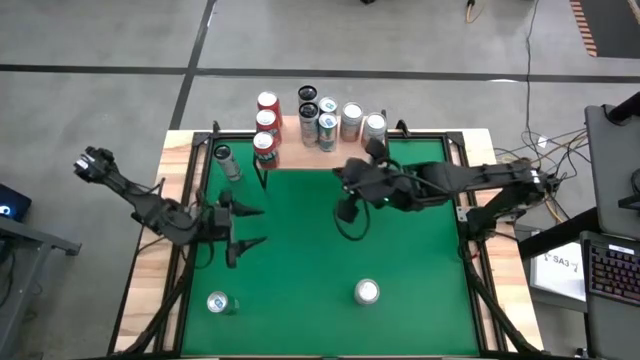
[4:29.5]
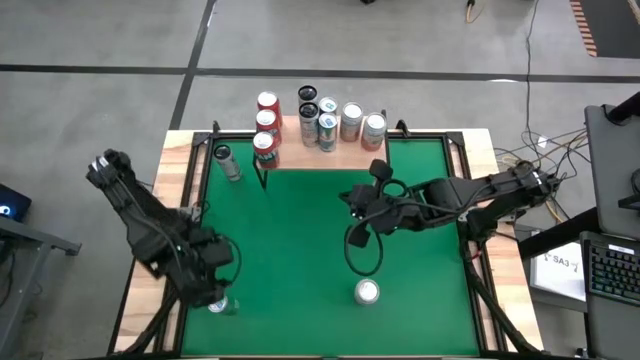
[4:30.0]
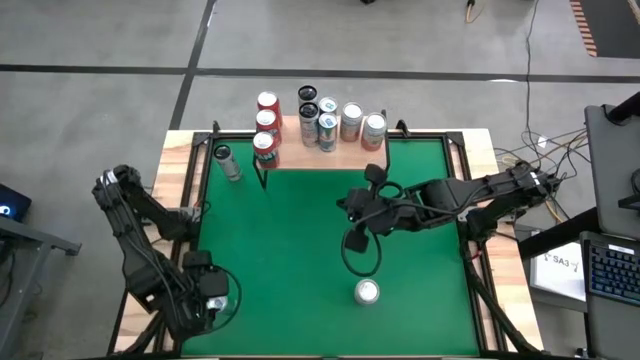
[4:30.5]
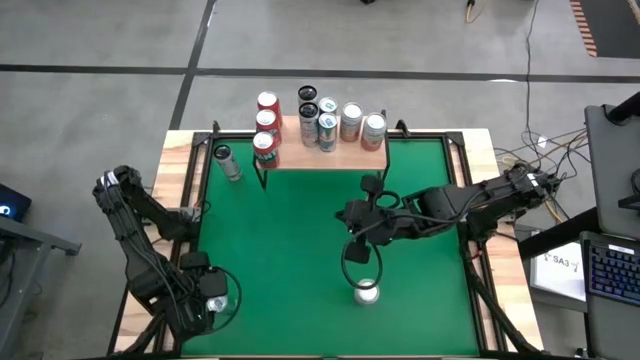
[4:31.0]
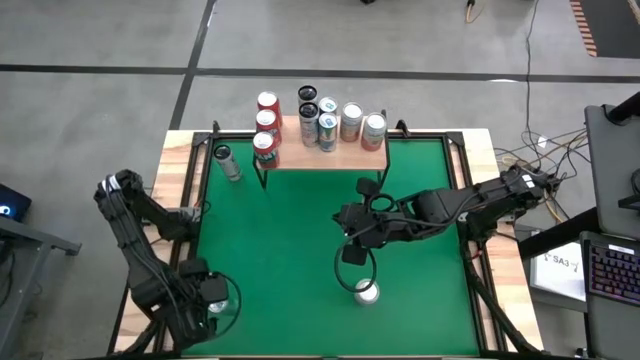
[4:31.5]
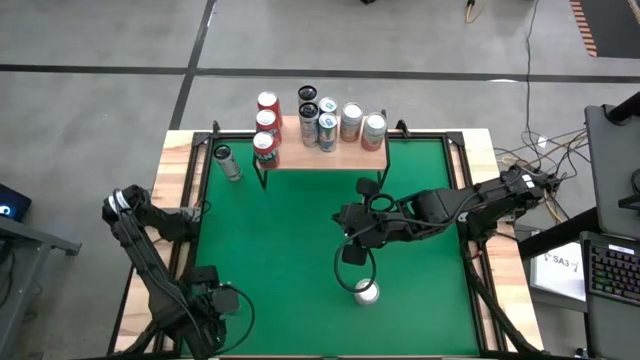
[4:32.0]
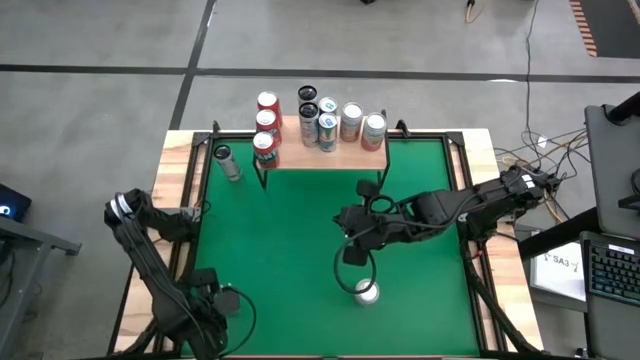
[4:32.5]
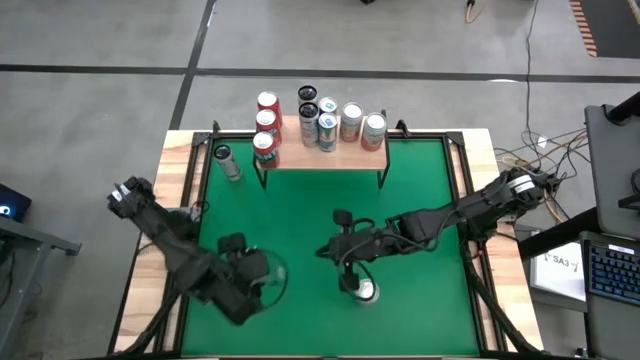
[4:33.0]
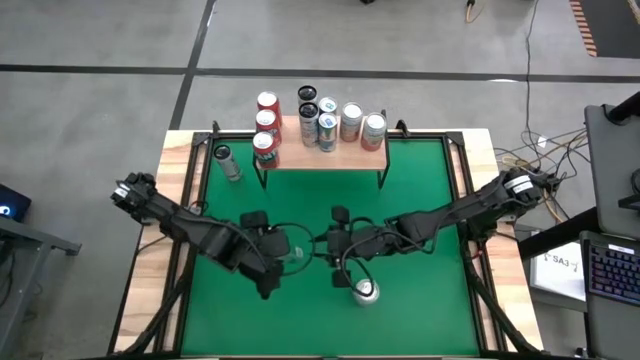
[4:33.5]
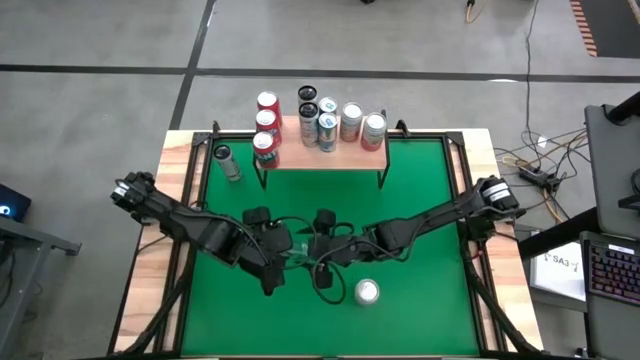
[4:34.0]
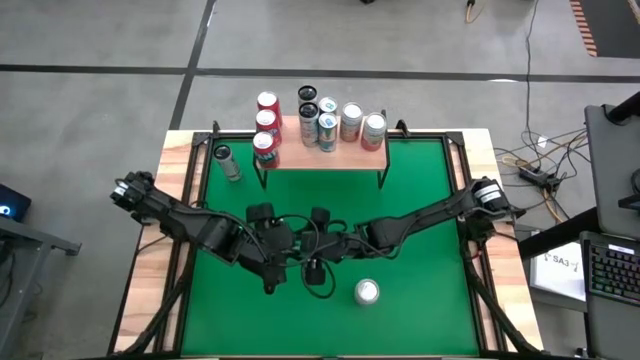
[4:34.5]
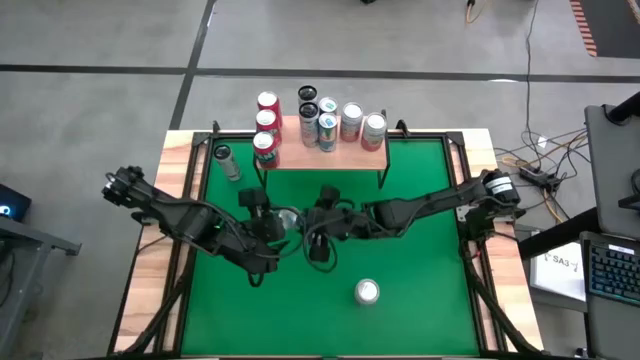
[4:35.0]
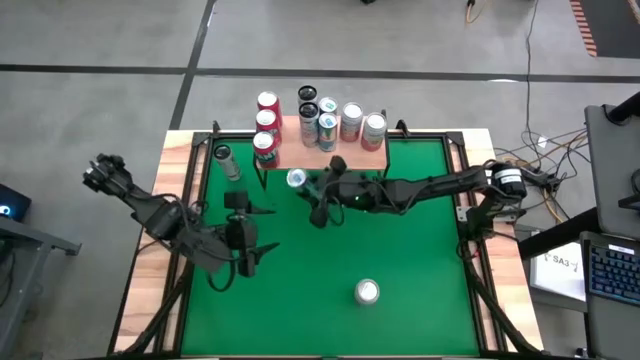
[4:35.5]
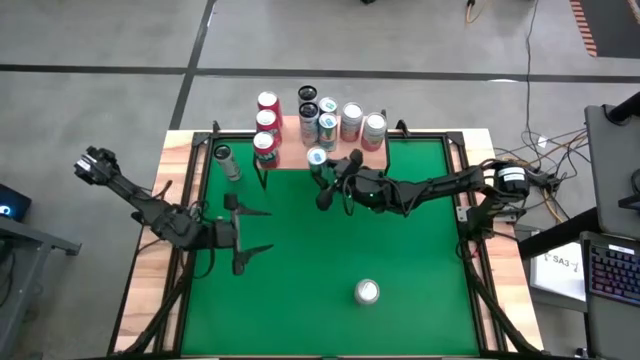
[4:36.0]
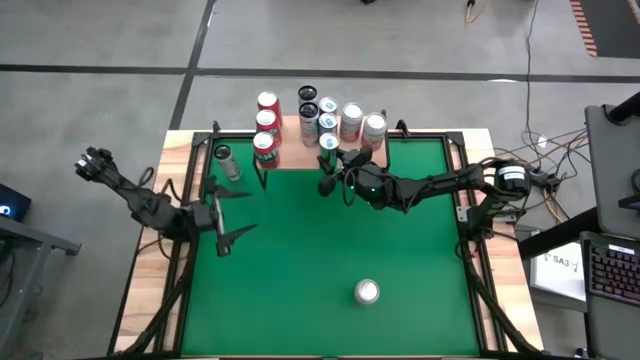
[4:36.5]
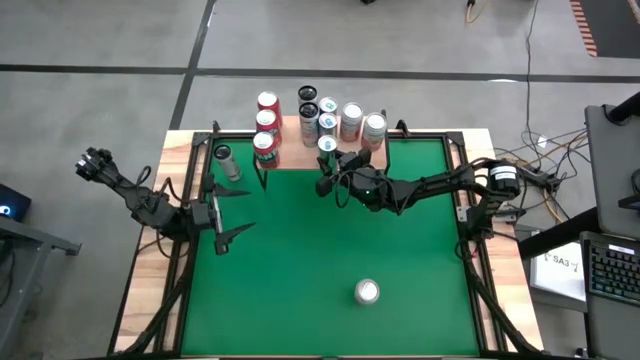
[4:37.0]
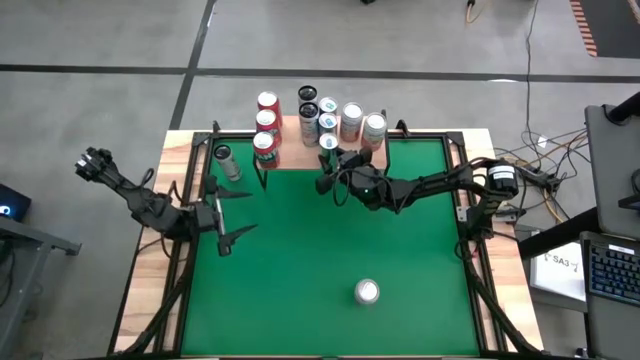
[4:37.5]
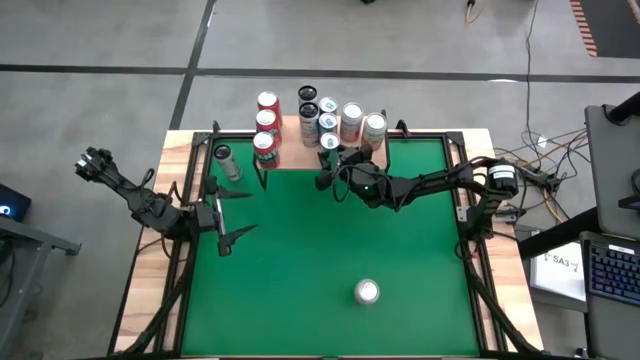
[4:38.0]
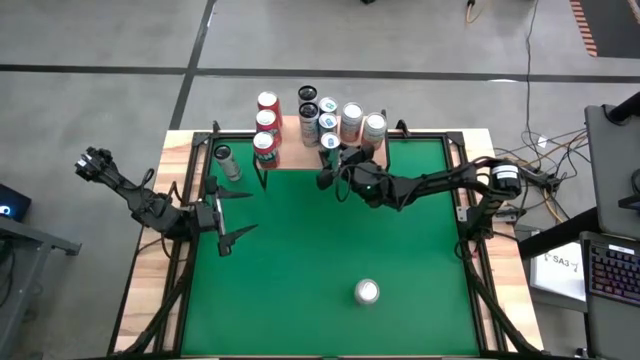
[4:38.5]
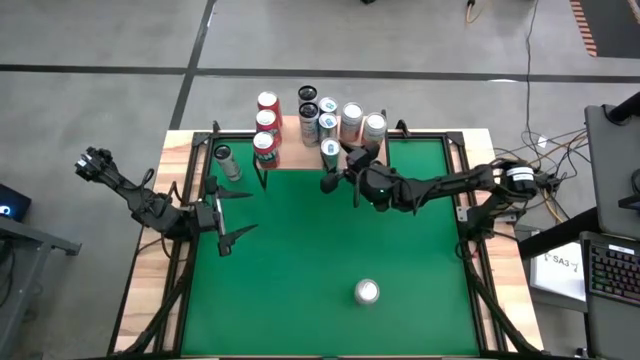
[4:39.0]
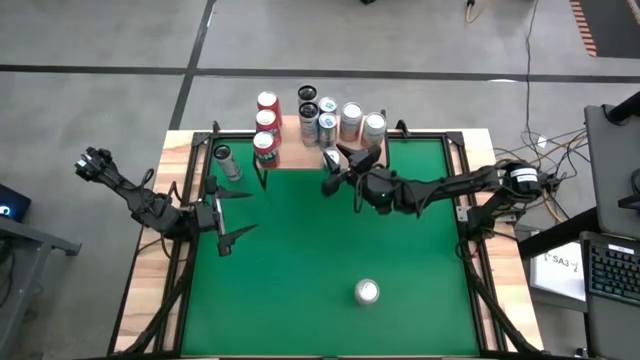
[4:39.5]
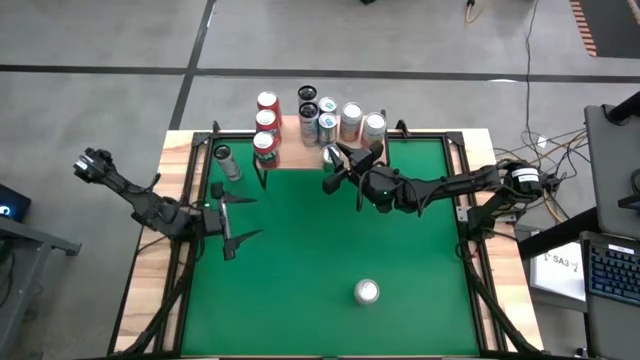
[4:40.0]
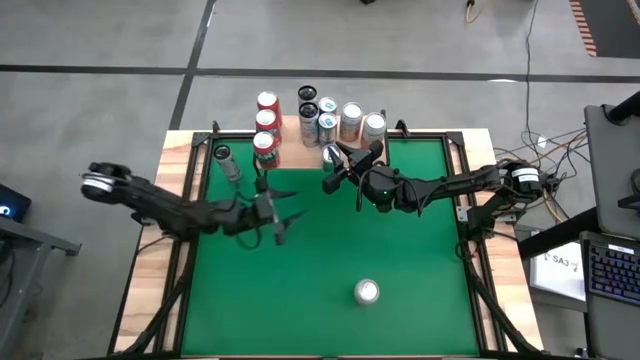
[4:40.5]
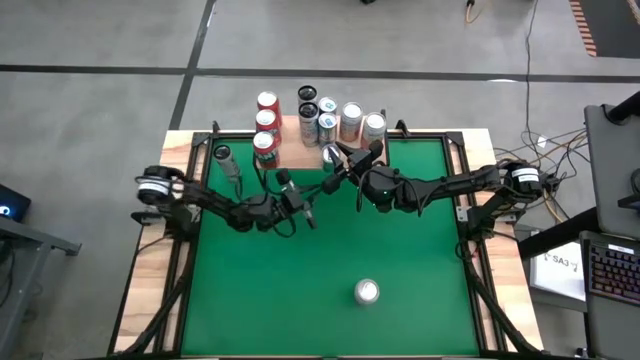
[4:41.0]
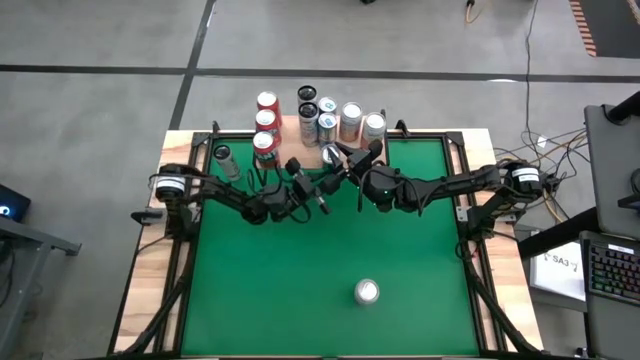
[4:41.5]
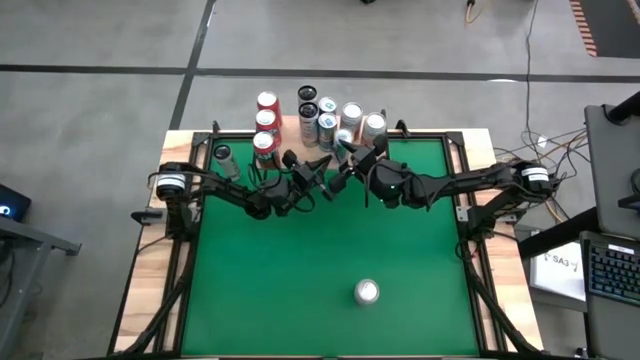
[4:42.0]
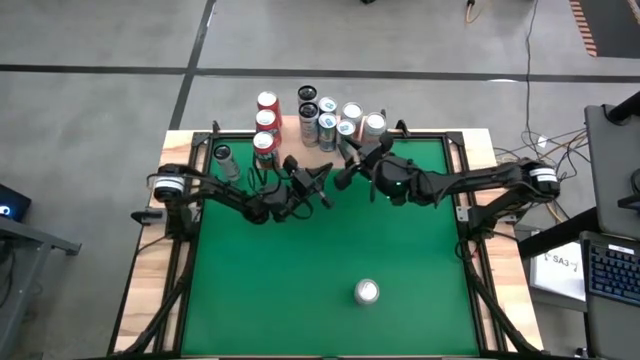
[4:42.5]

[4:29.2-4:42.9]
Task: Place canned beverage on shelf
Put the blue soda can on the shelf aligned with other blue soda cans

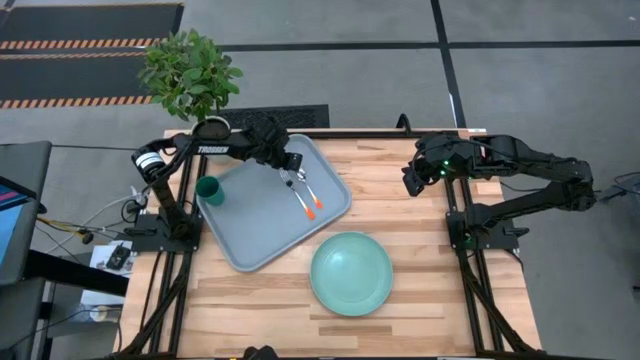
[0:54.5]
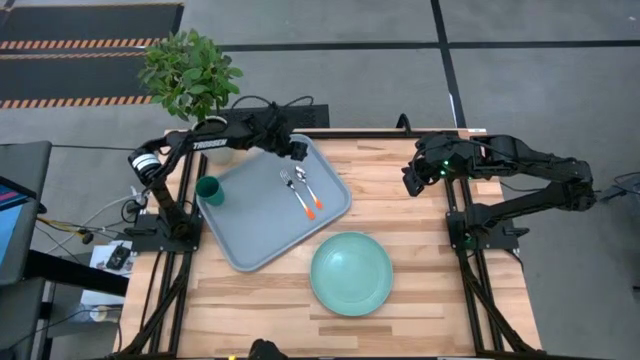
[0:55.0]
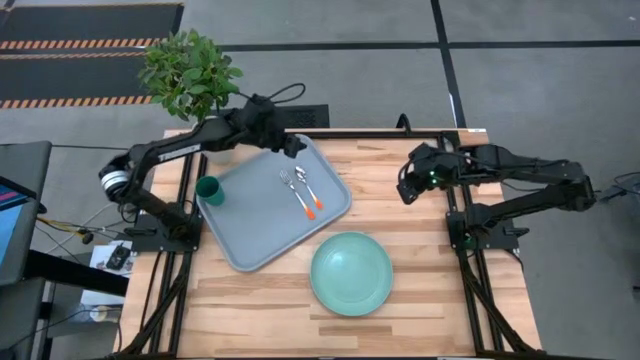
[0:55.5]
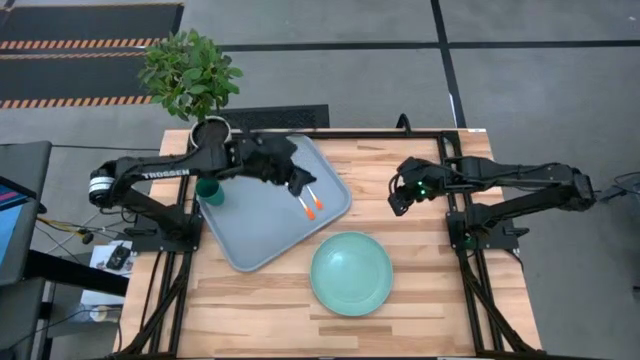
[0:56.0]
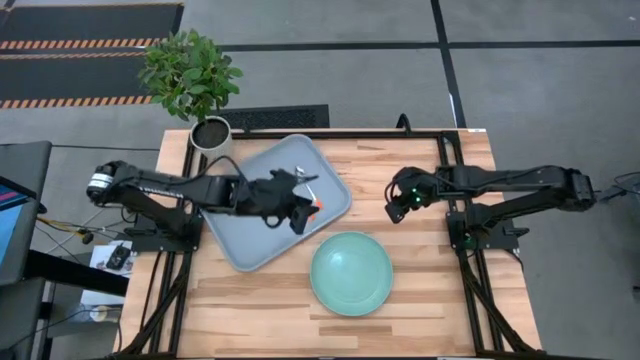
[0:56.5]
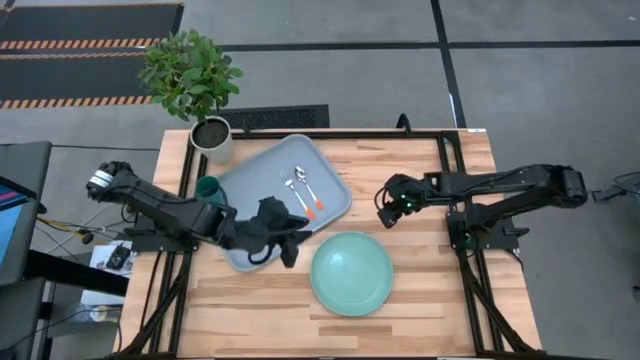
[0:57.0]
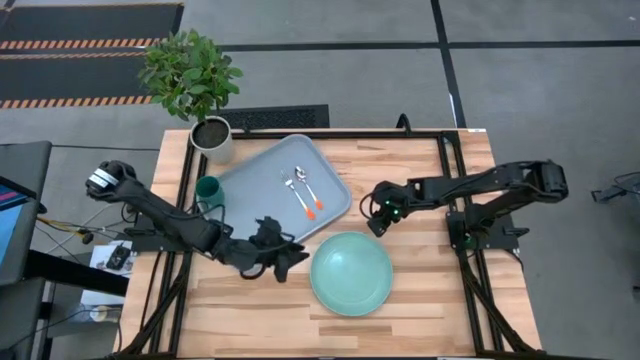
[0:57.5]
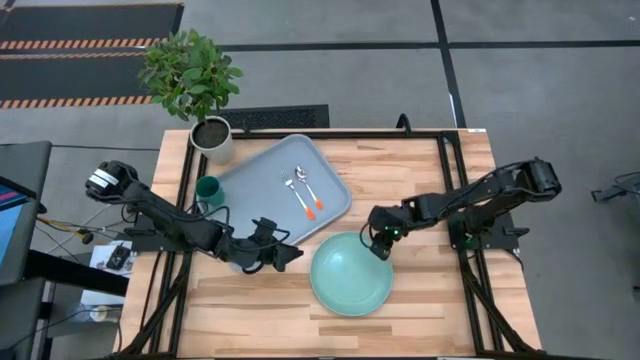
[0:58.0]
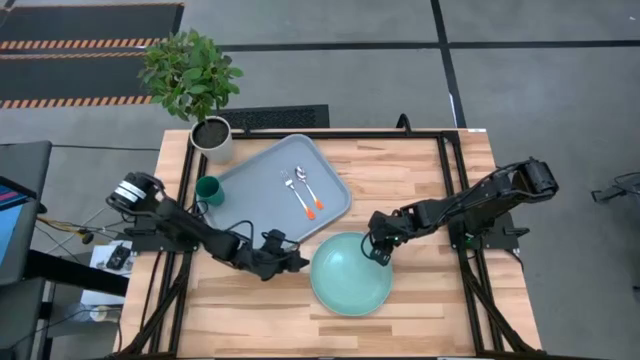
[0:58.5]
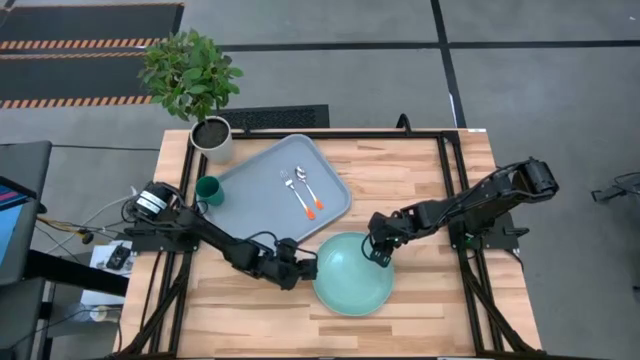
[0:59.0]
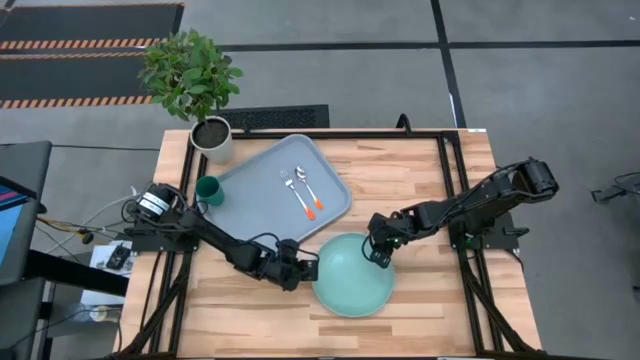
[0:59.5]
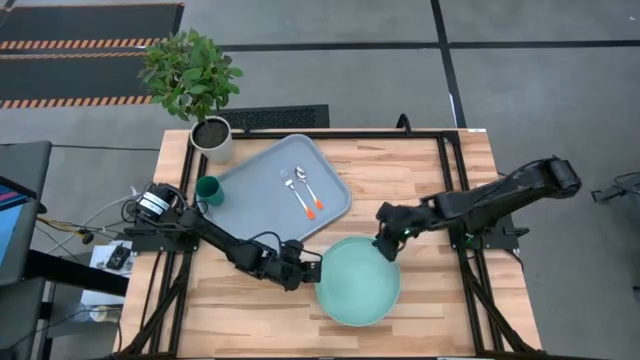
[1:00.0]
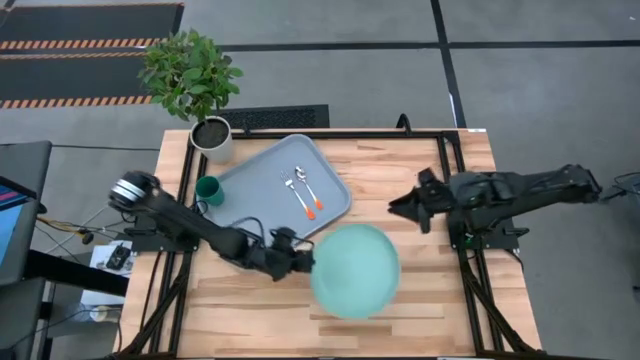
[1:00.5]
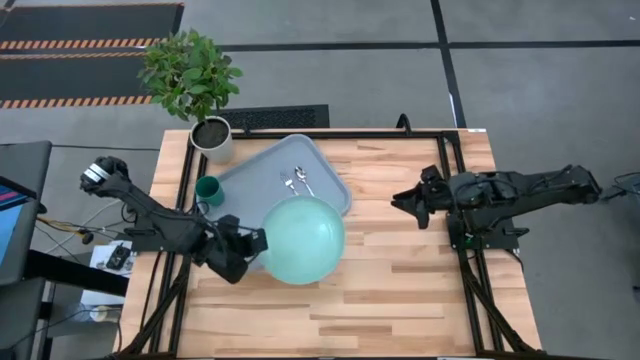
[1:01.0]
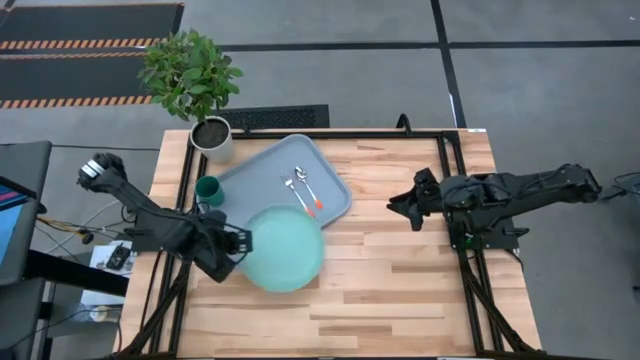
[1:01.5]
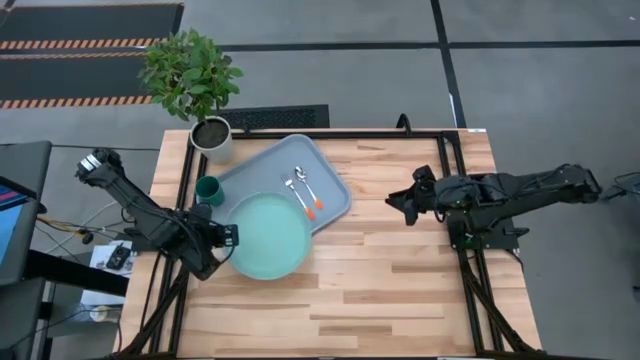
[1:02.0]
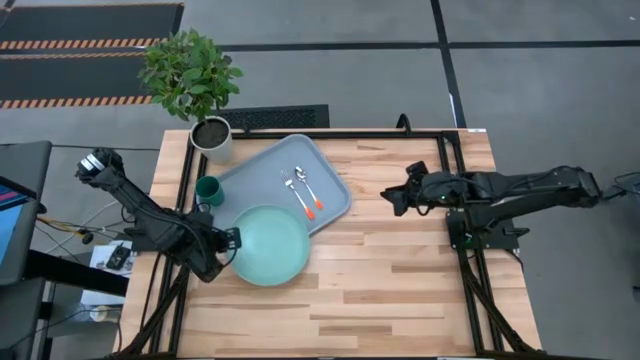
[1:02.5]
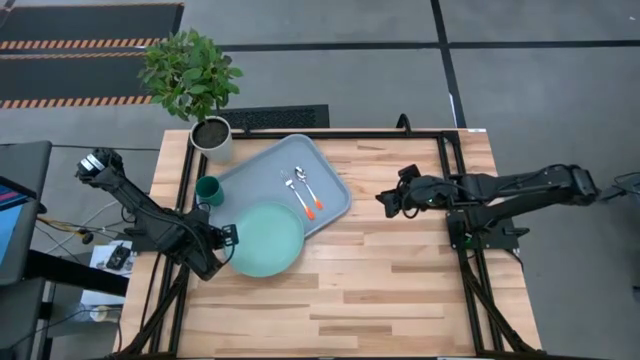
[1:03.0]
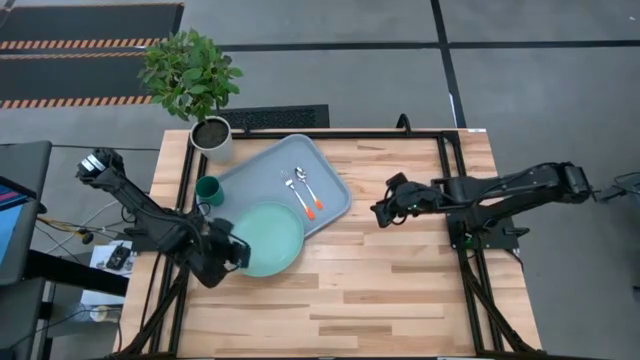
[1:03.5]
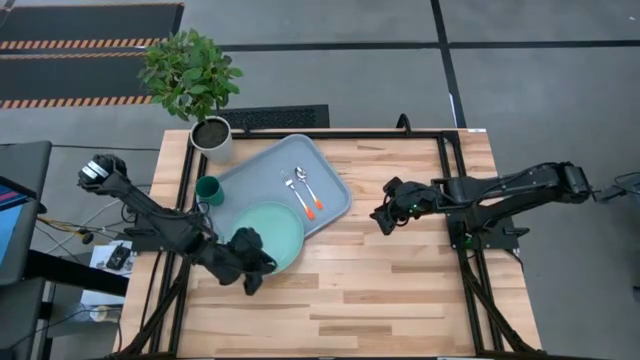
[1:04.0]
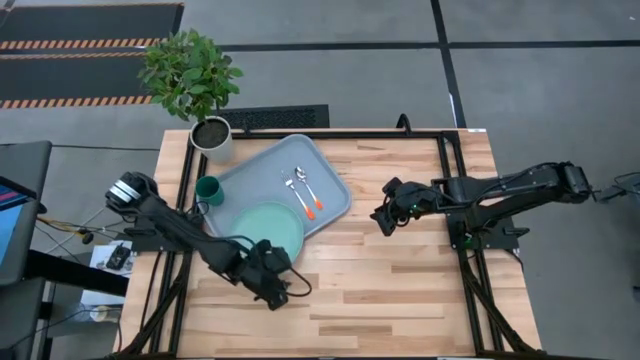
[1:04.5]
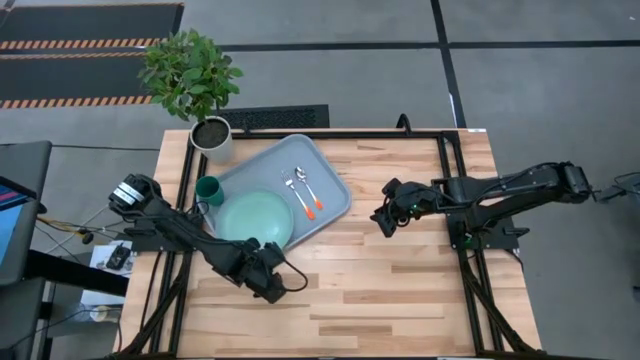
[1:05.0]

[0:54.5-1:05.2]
Task: Pick and place plate/cup/fork/spoon on tray
Put the green plate on the gray serving tray
